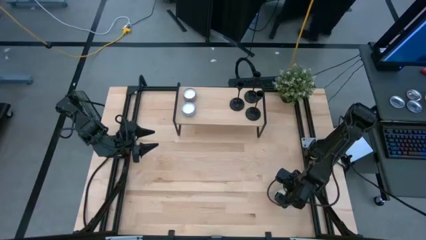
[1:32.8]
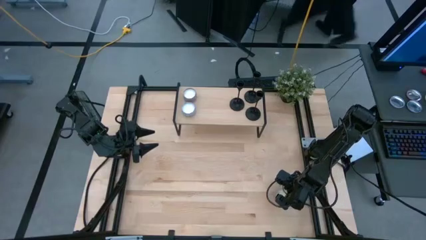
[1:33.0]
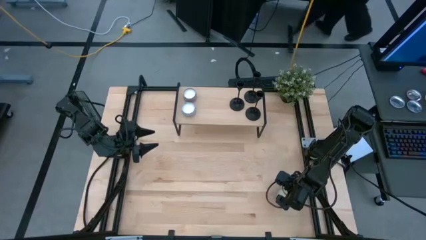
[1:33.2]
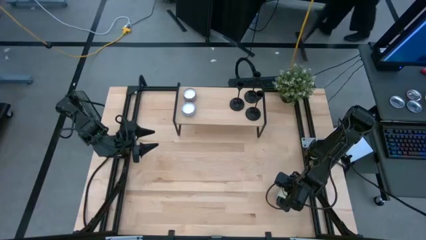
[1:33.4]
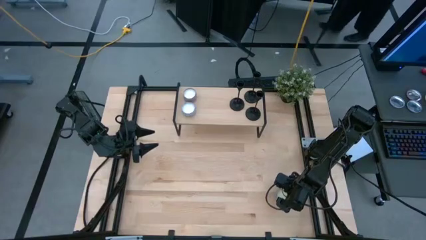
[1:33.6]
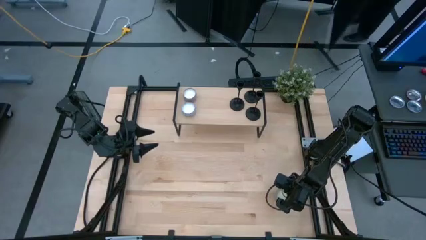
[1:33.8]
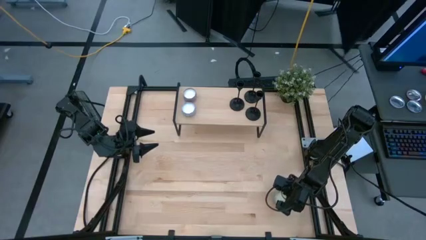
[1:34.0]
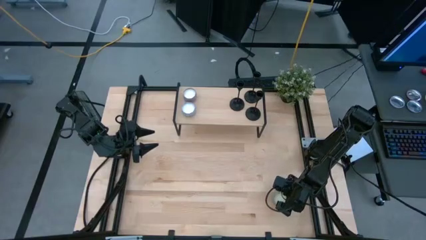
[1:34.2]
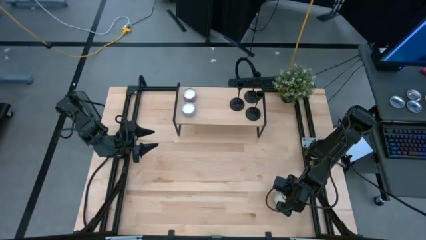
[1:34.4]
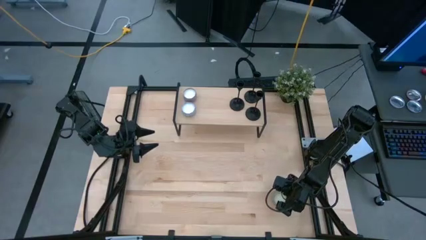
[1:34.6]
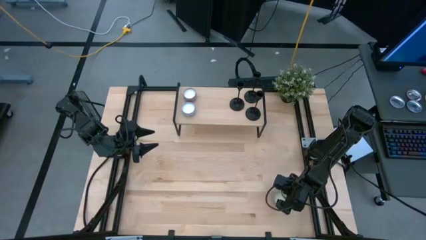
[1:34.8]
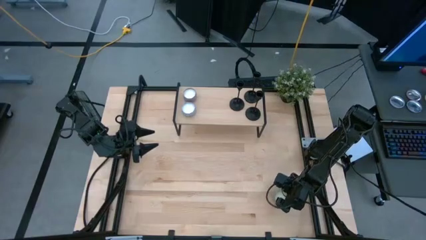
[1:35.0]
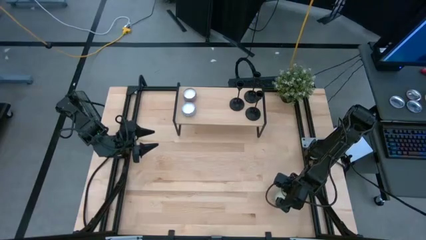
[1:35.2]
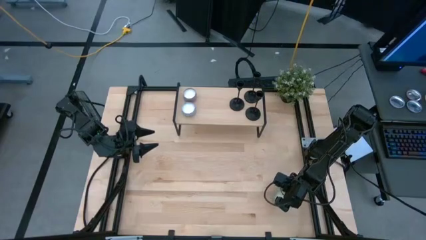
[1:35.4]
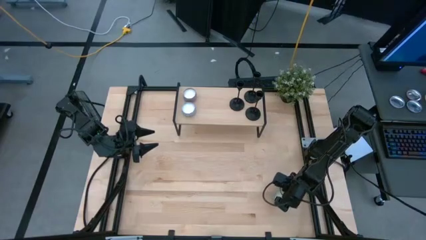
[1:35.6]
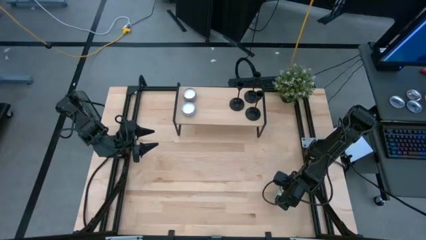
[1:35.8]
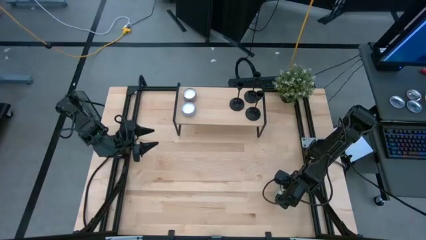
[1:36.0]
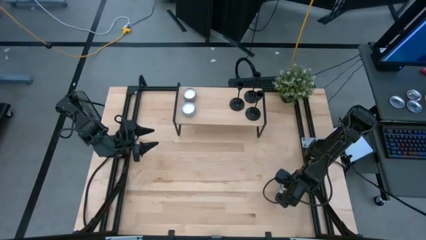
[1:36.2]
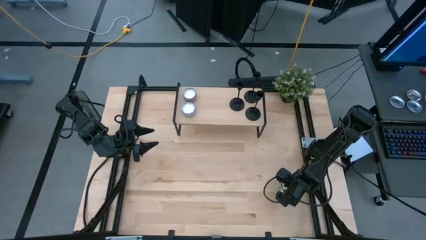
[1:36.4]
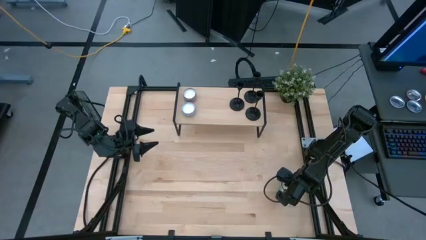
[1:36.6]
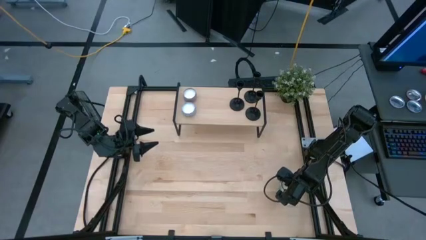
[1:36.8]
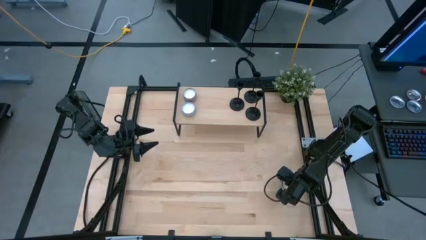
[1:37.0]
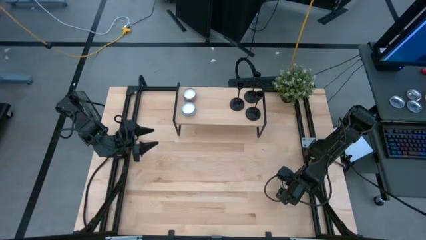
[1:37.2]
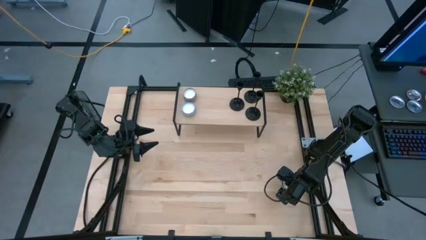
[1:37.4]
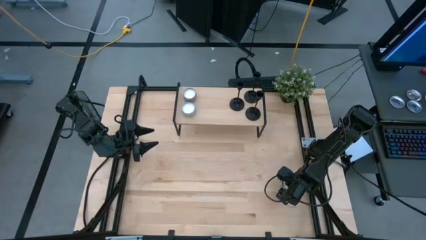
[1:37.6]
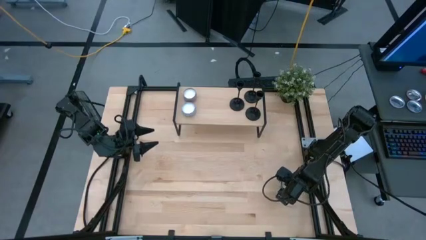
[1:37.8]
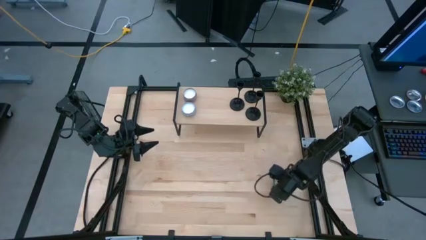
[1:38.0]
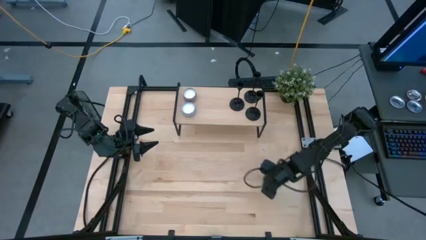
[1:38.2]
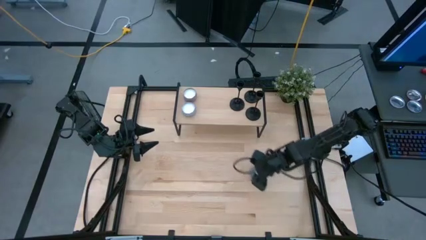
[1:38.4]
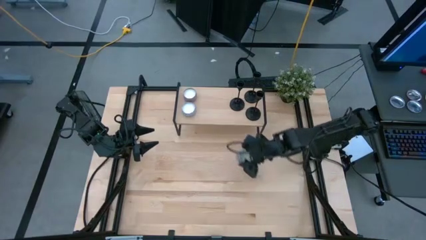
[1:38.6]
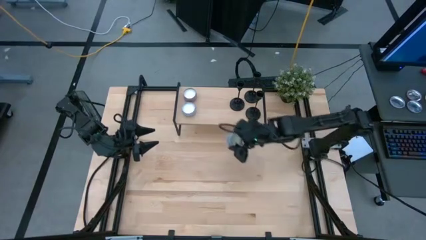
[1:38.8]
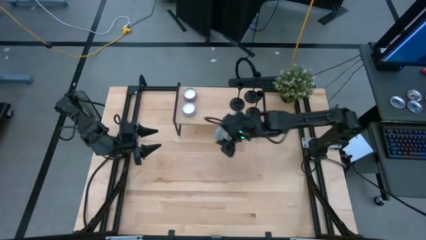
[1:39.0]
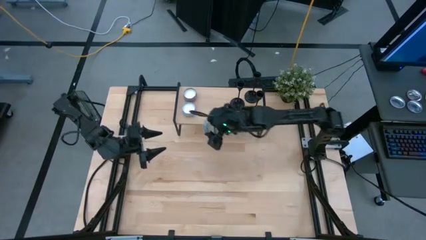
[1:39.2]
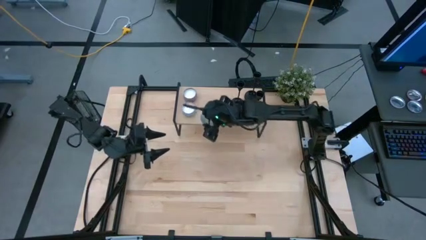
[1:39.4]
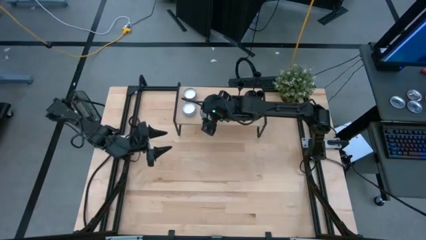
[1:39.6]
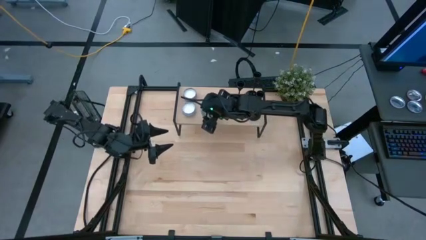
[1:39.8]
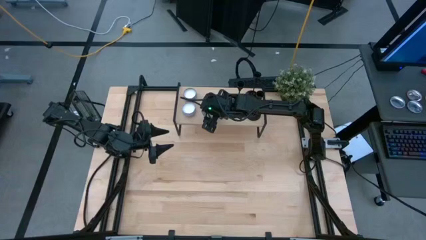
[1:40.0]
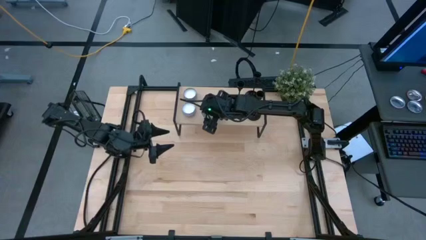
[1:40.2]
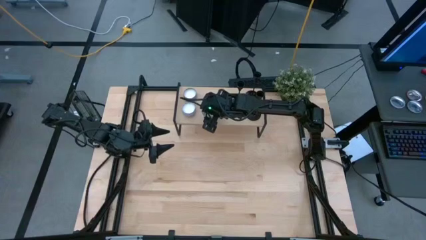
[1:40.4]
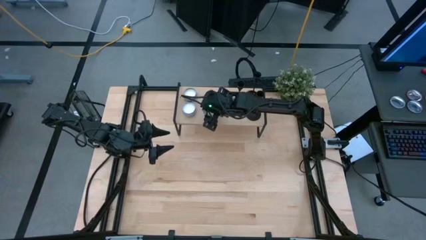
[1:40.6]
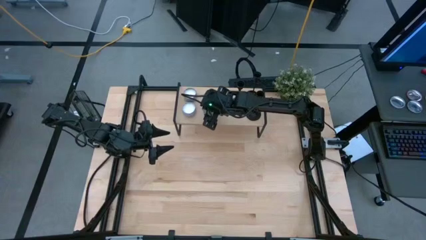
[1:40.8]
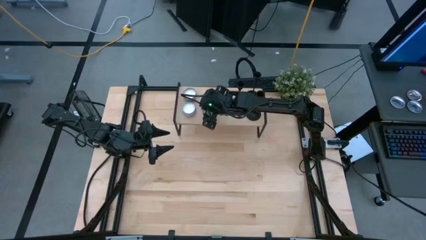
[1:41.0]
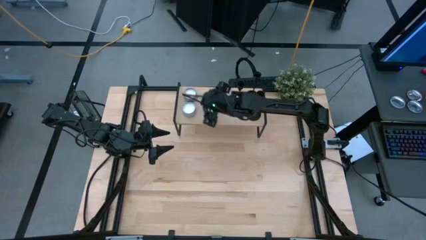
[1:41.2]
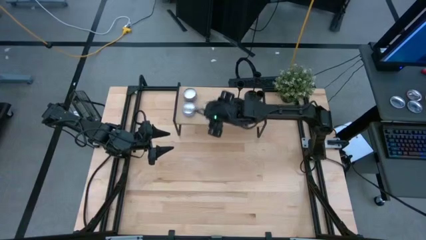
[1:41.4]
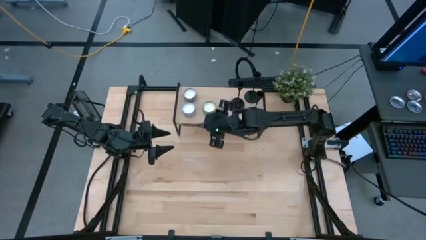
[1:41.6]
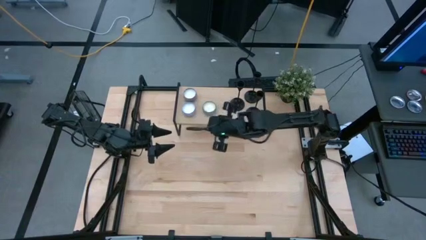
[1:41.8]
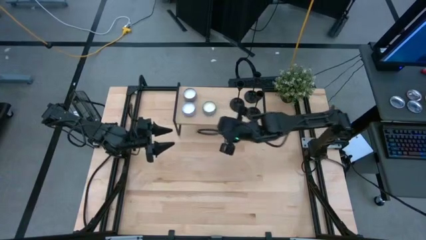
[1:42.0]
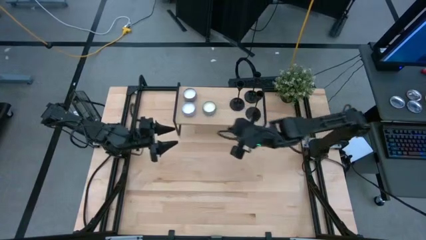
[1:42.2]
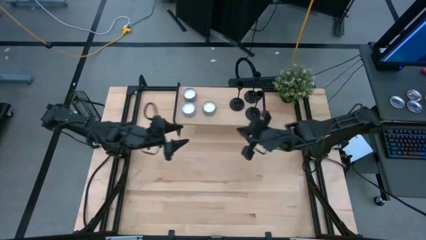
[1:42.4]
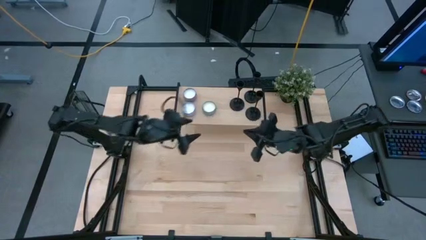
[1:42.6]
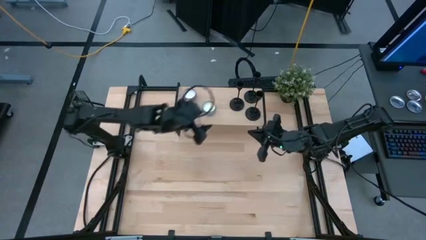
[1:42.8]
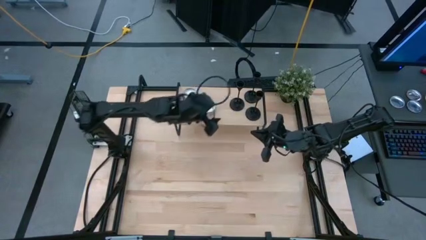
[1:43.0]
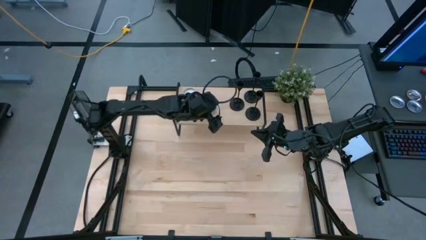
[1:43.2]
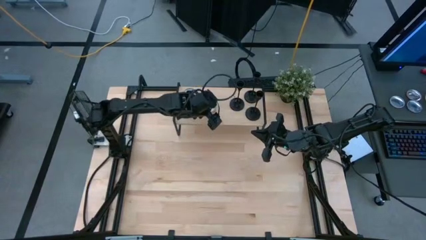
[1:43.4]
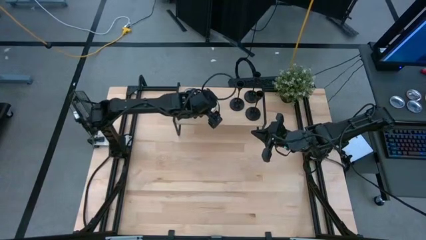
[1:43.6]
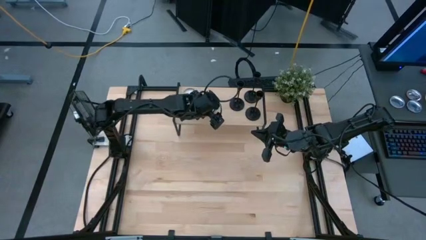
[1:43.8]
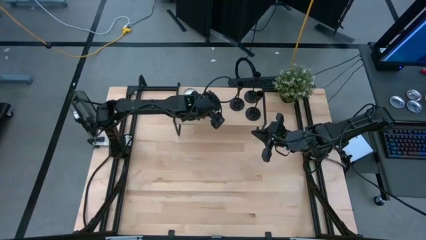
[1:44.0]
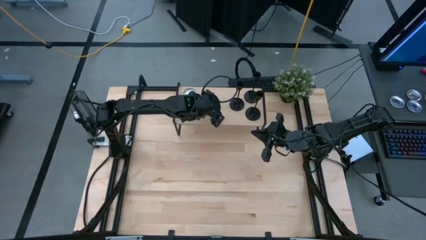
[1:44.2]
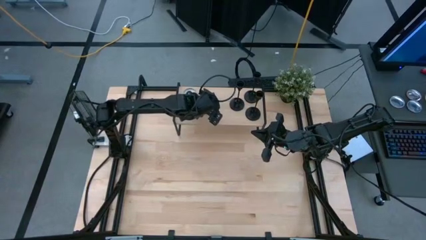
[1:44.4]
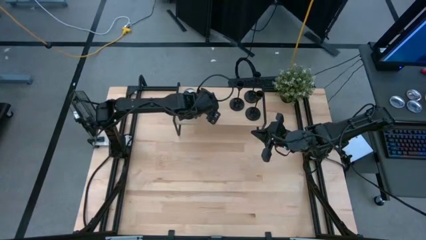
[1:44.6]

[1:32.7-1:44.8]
Task: Pick & Place candle stick holders
Put the green scented candle on the shelf

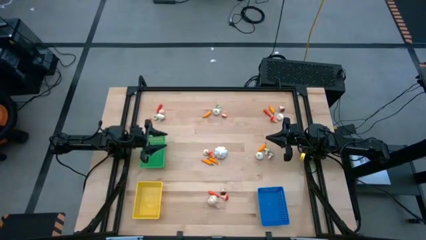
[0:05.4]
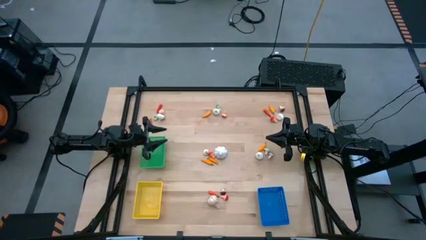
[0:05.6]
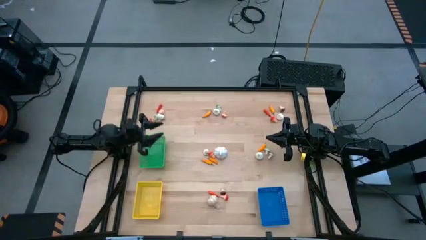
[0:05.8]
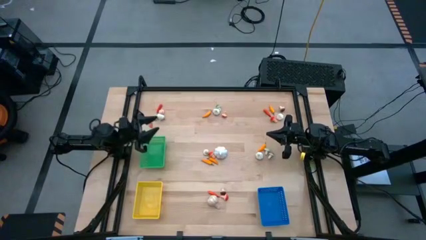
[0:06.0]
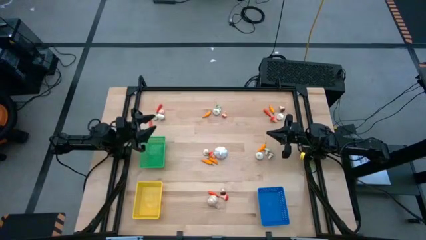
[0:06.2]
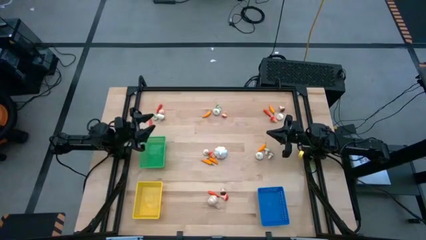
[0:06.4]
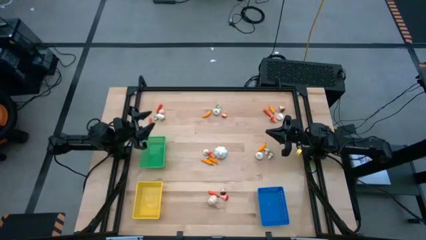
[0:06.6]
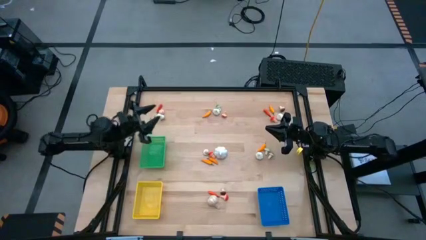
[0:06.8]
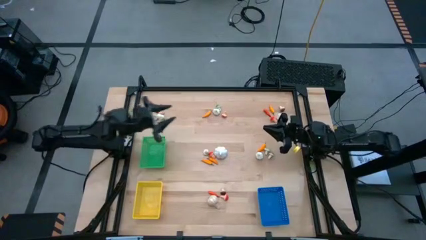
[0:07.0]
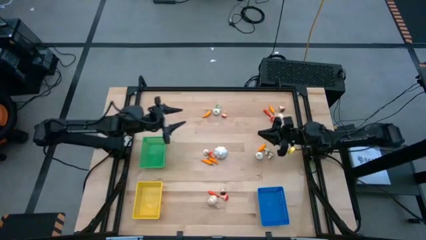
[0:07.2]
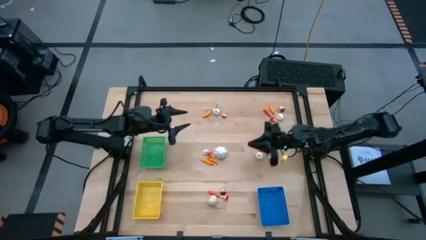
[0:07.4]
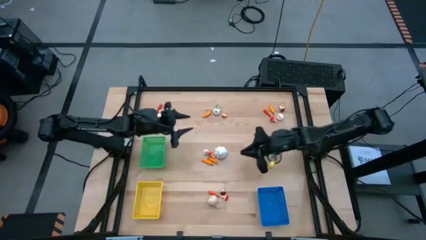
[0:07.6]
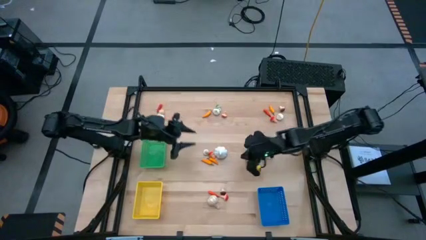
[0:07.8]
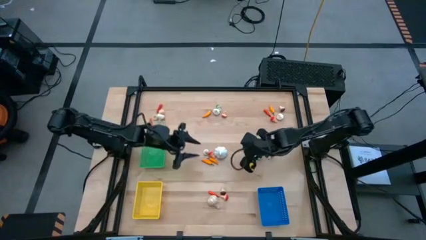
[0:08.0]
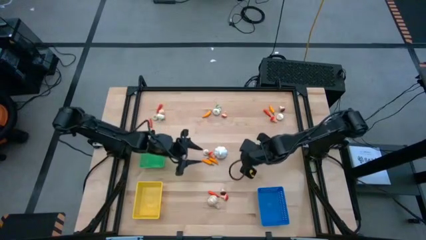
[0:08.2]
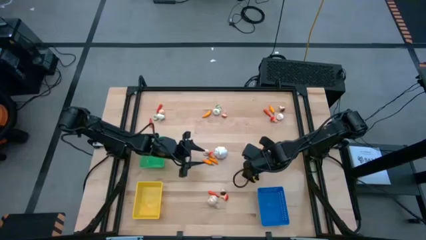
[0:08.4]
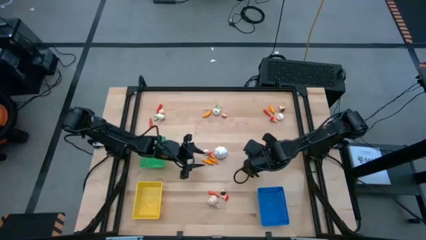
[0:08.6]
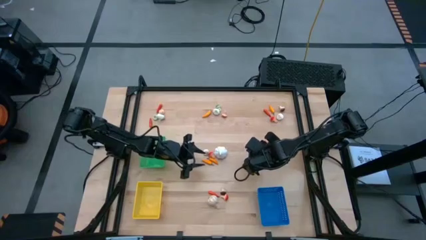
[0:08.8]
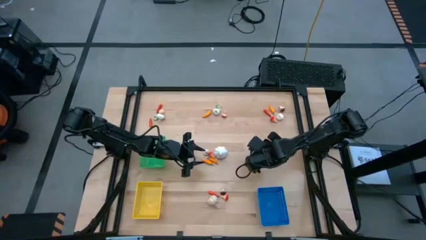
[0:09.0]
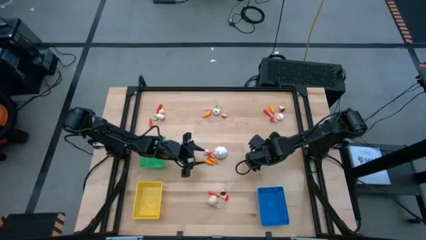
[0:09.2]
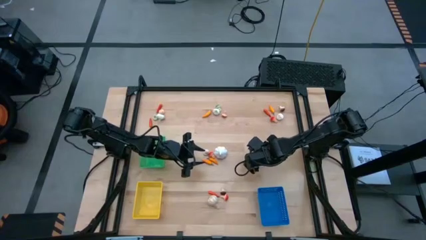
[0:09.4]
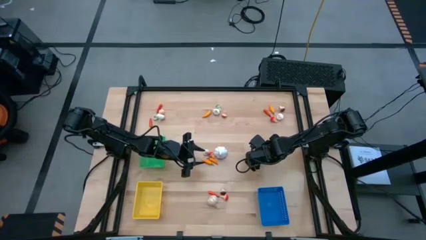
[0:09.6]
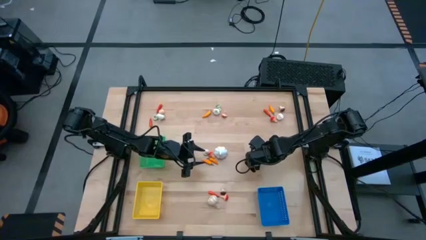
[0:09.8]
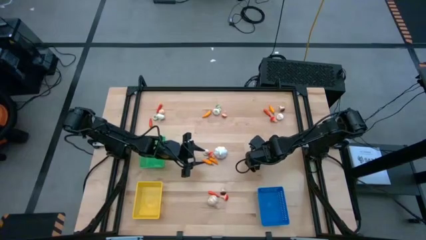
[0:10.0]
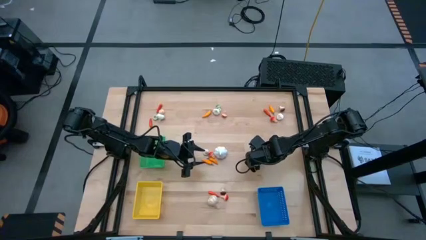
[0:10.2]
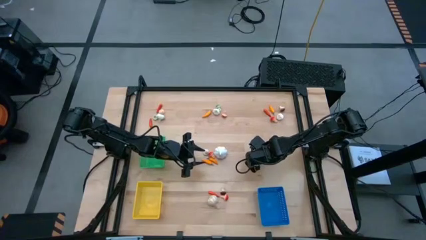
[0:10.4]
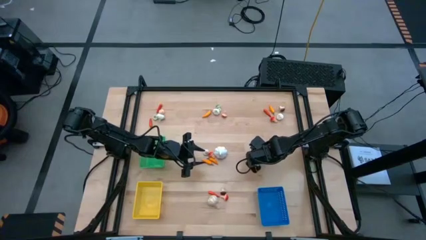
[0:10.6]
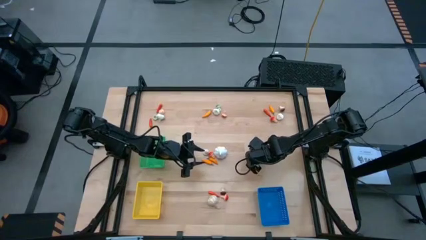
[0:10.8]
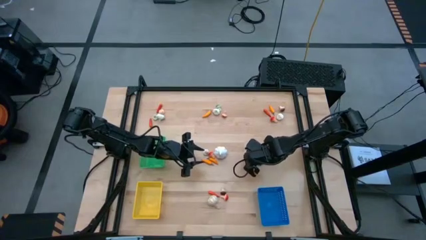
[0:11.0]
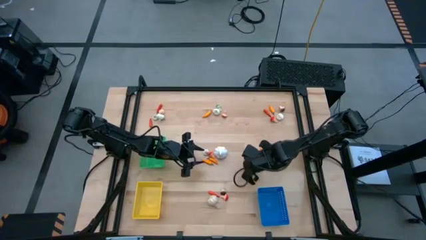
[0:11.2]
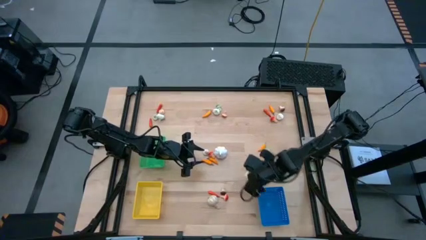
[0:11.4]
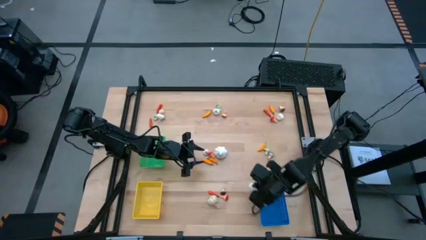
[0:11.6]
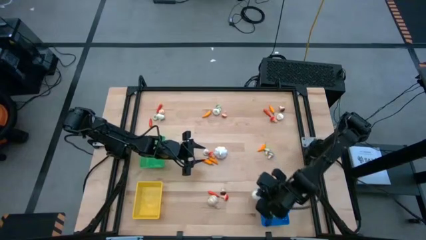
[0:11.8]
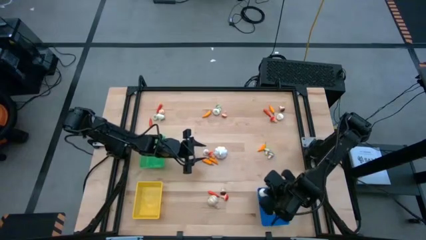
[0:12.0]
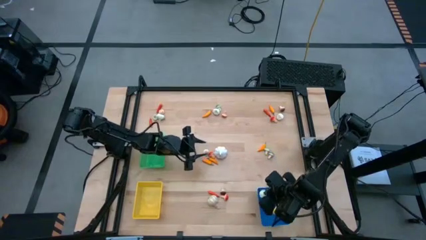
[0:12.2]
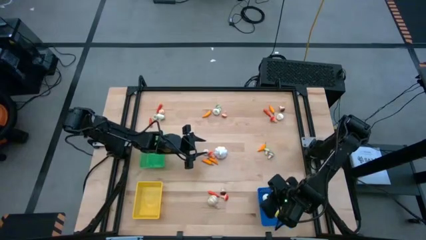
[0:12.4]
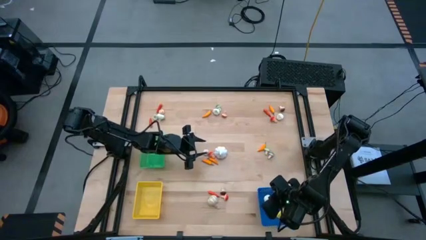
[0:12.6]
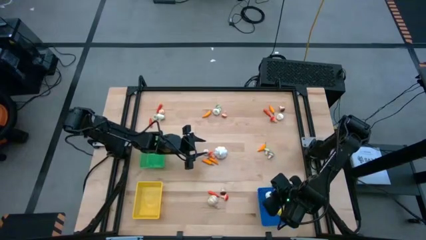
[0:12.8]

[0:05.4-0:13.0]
Task: Sort produce into baskets
Put the garlic into the blue bin
